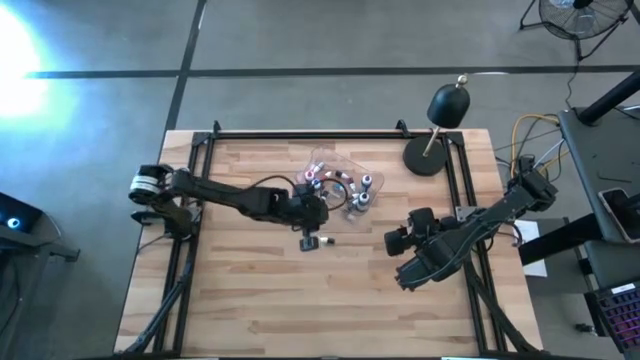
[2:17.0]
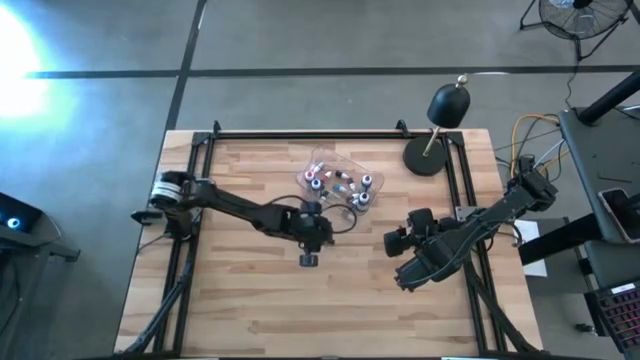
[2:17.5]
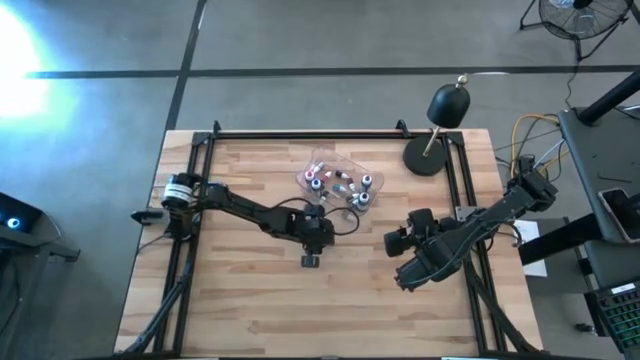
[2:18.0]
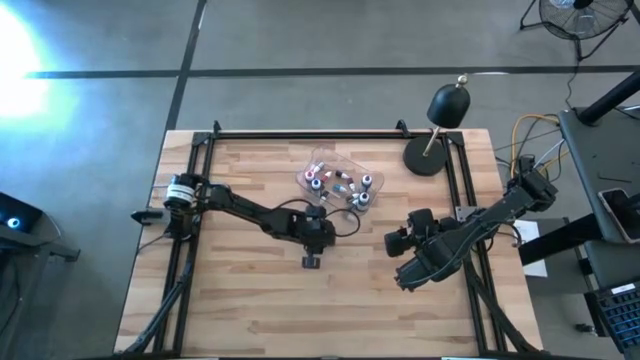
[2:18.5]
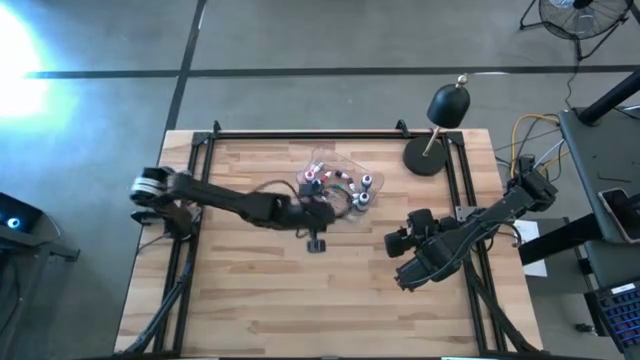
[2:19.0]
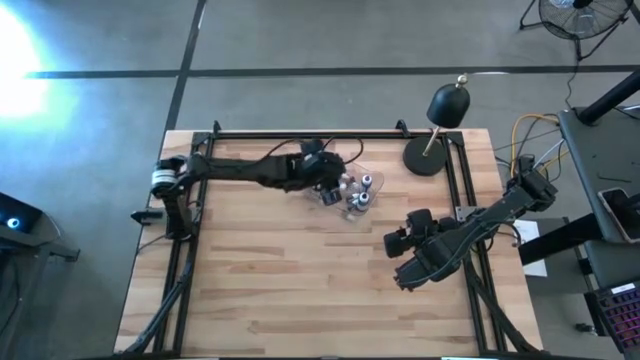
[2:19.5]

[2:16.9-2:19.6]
Task: Pick & Place food coloring
Put the small black food coloring bottle into the transparent bin

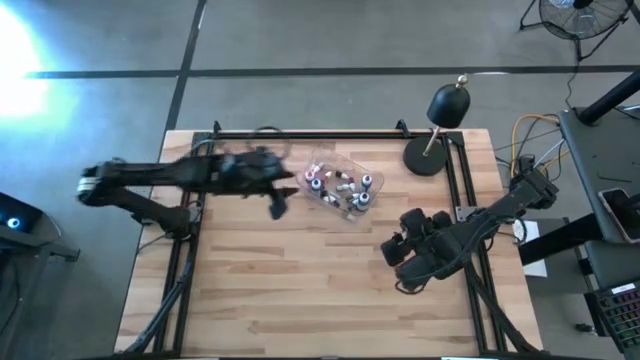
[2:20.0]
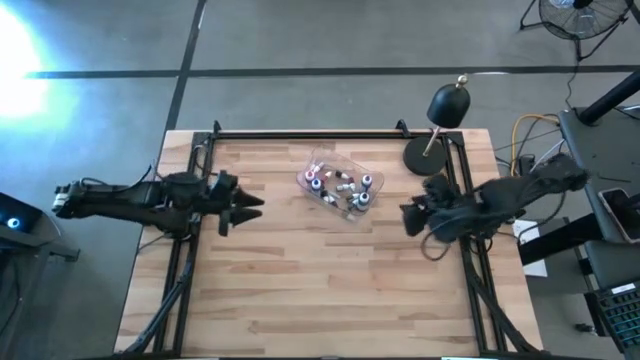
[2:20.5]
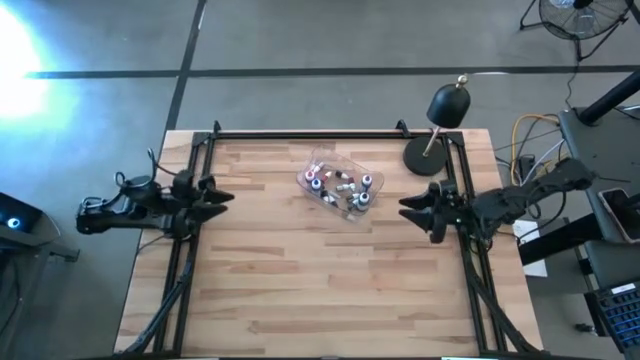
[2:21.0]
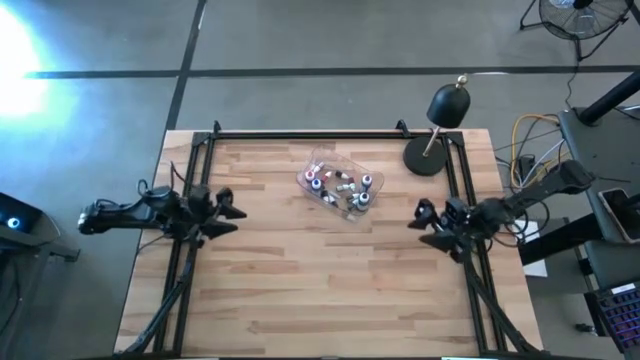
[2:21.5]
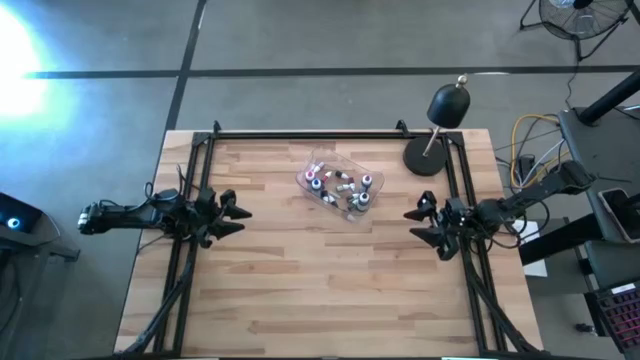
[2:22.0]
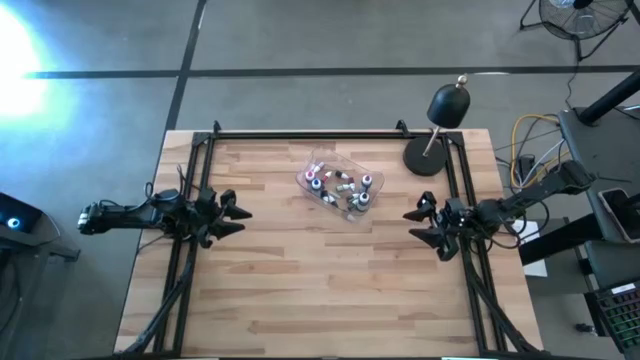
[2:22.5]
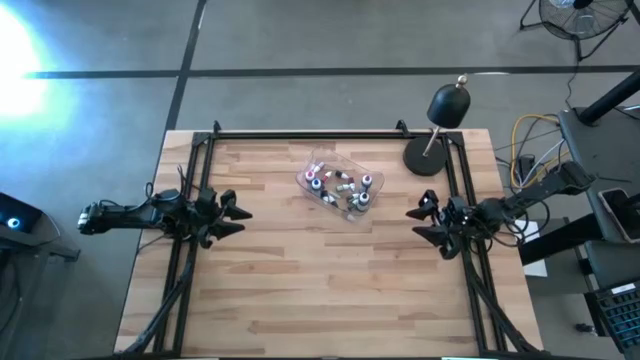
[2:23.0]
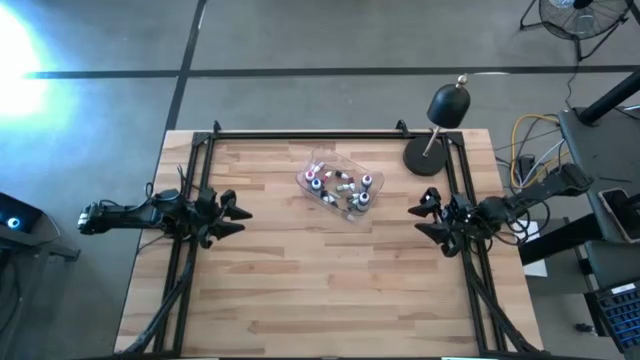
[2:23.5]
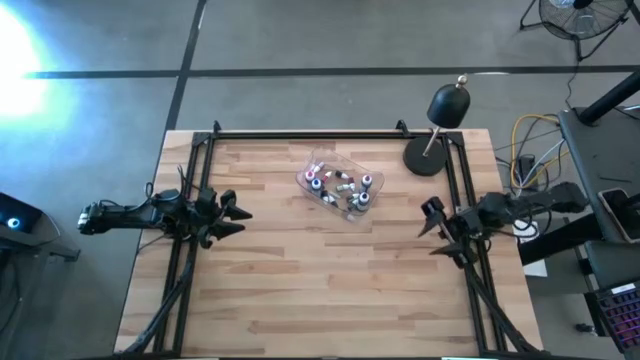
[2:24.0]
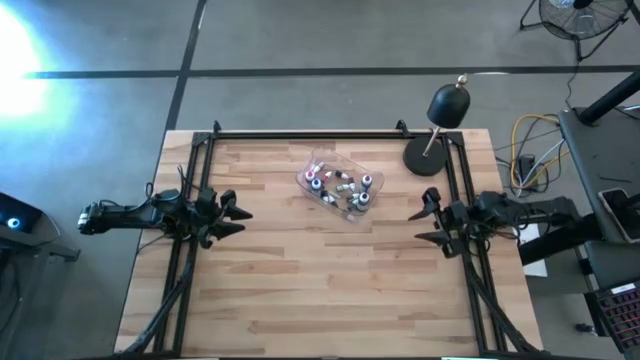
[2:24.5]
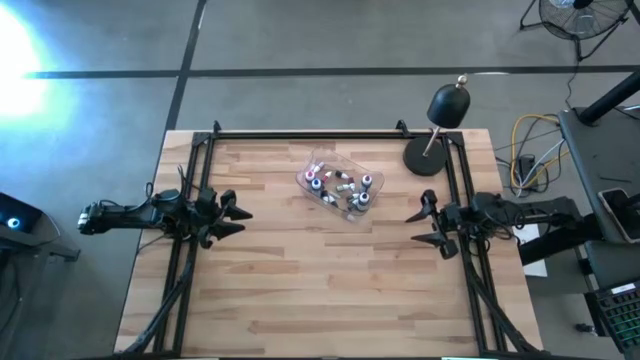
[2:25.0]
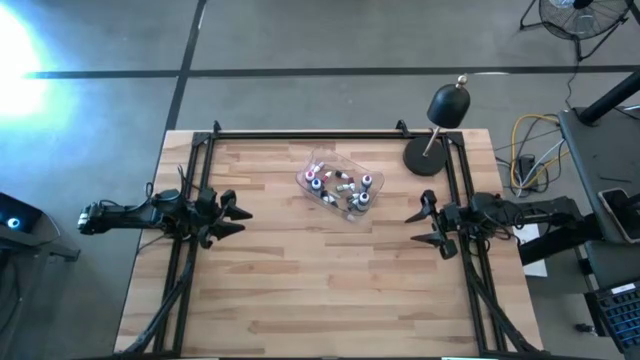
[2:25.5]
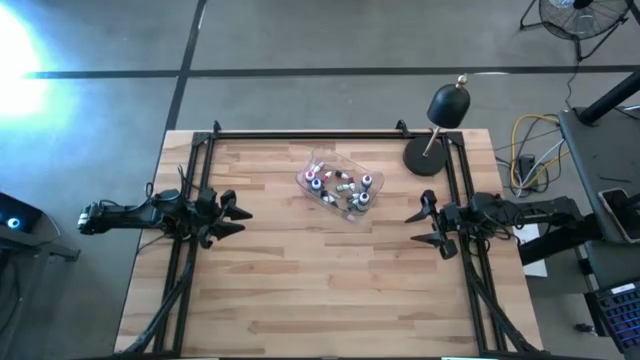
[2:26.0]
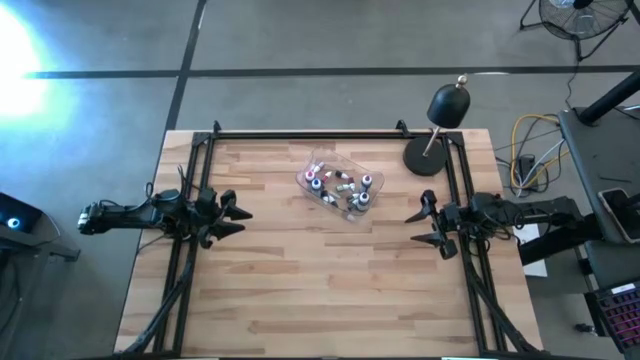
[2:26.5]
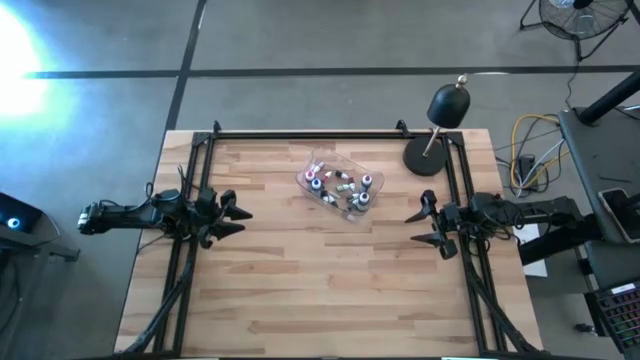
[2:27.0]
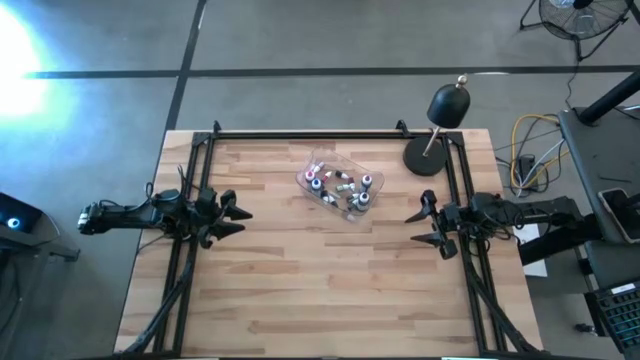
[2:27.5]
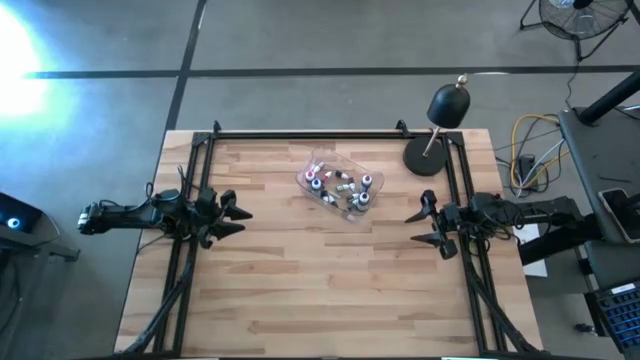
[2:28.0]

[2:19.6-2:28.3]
Return to Home Position

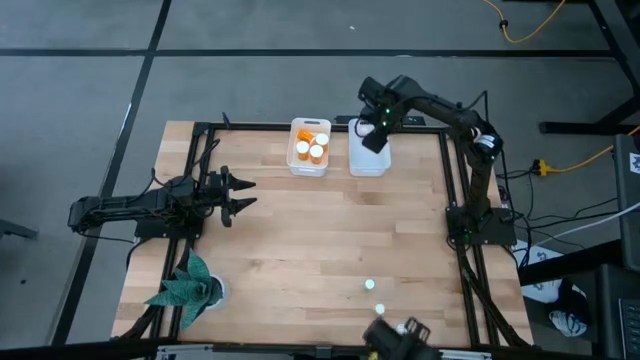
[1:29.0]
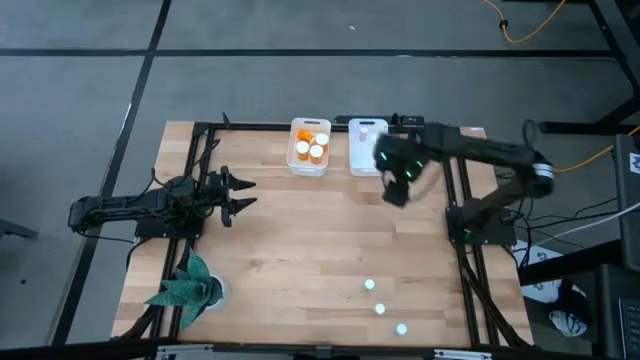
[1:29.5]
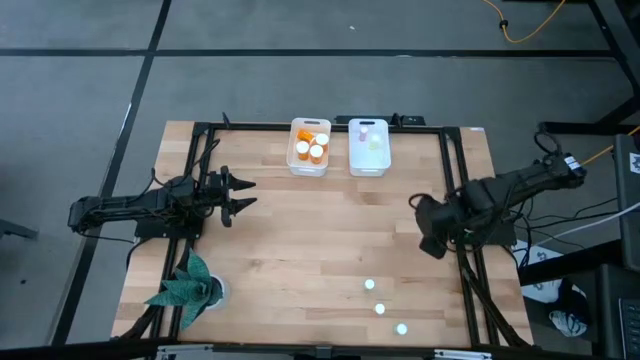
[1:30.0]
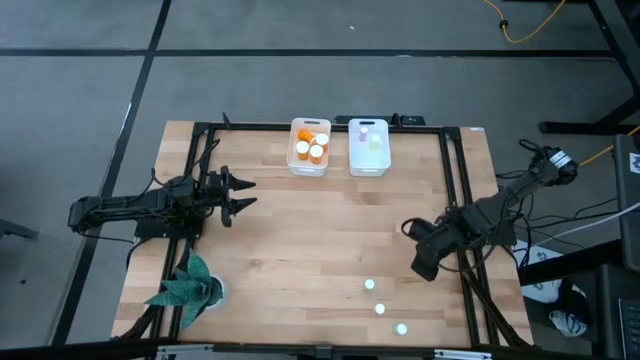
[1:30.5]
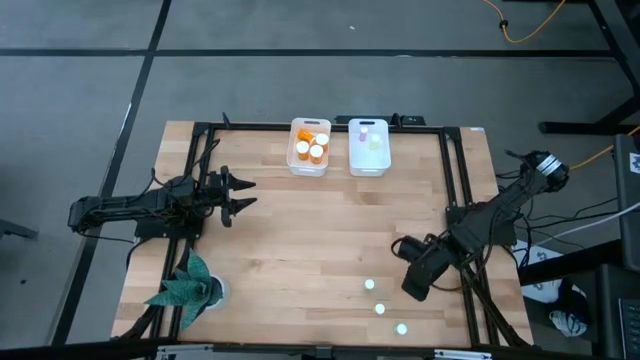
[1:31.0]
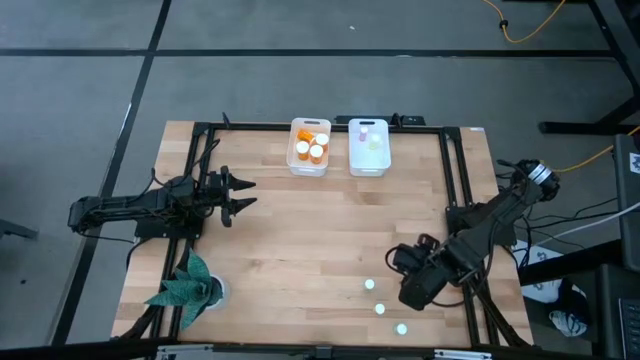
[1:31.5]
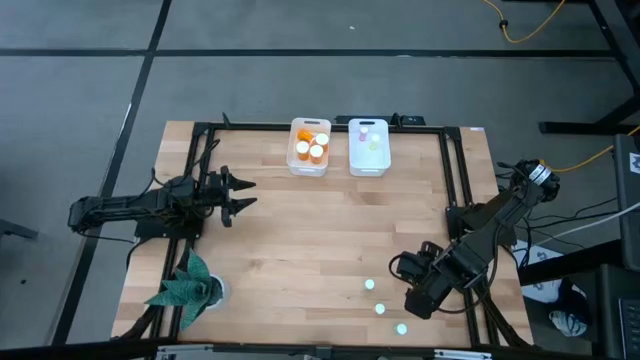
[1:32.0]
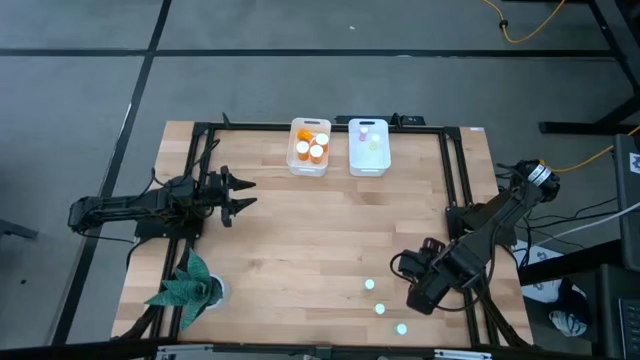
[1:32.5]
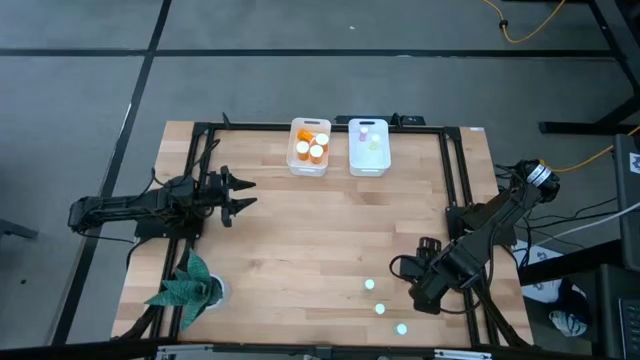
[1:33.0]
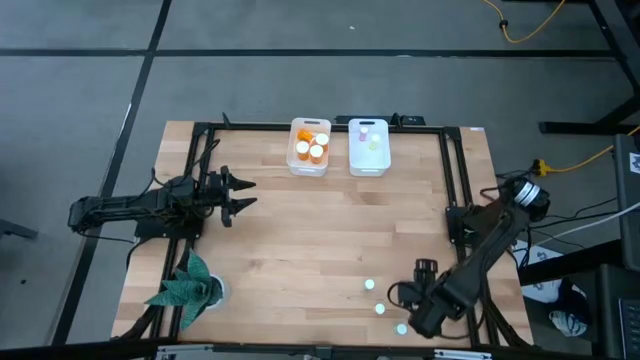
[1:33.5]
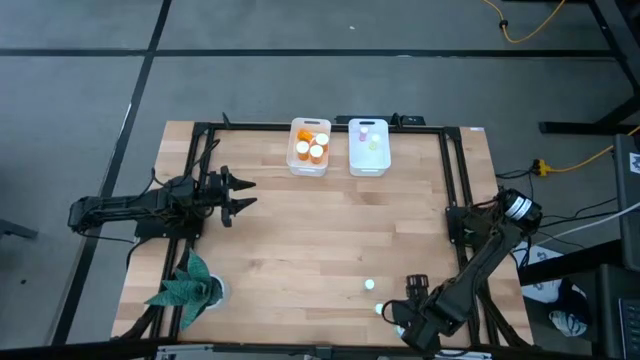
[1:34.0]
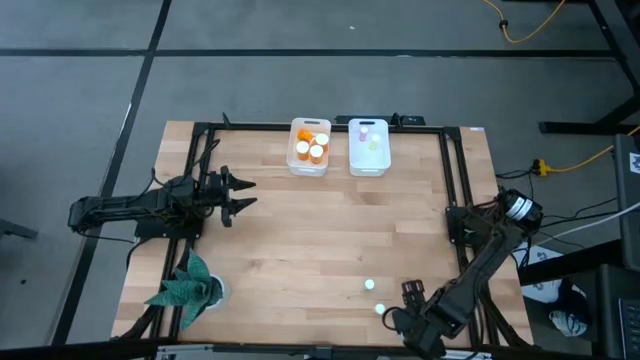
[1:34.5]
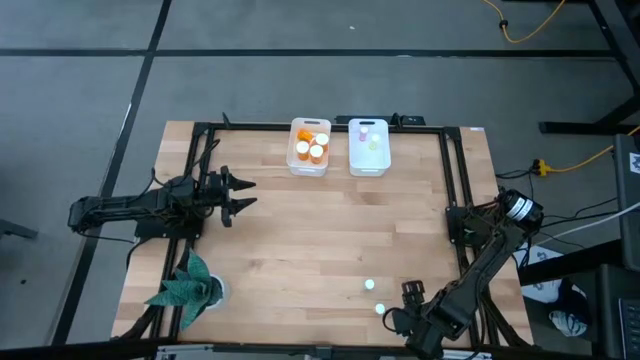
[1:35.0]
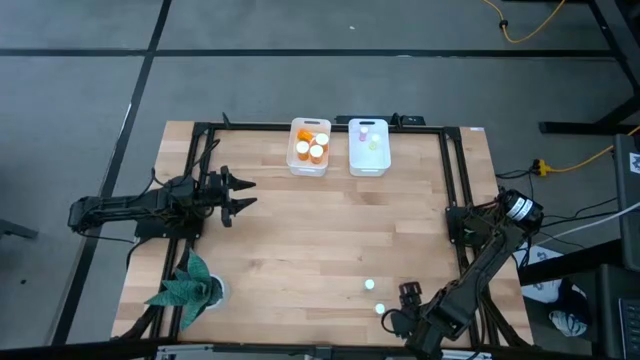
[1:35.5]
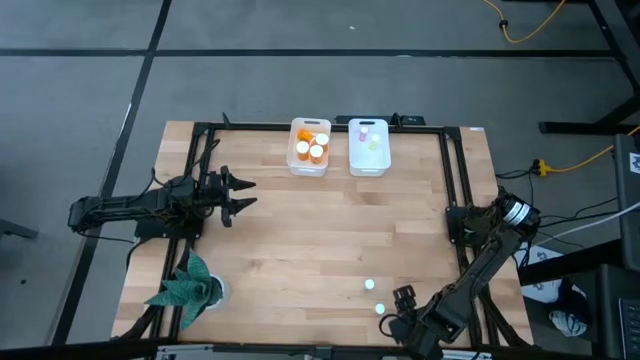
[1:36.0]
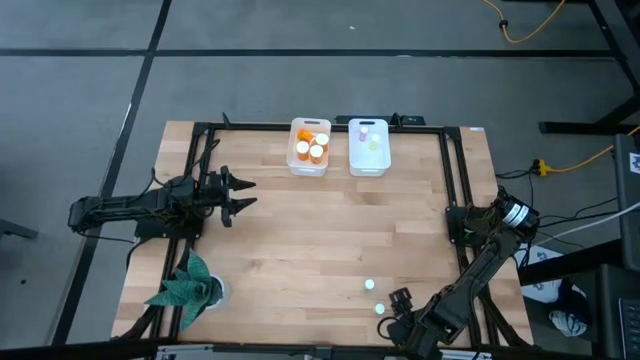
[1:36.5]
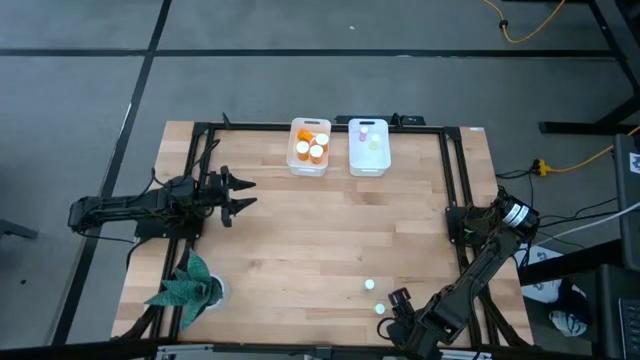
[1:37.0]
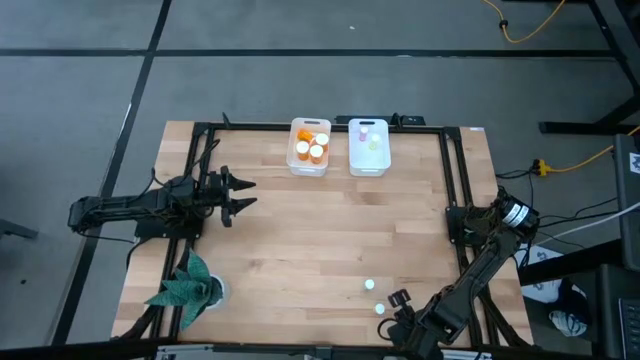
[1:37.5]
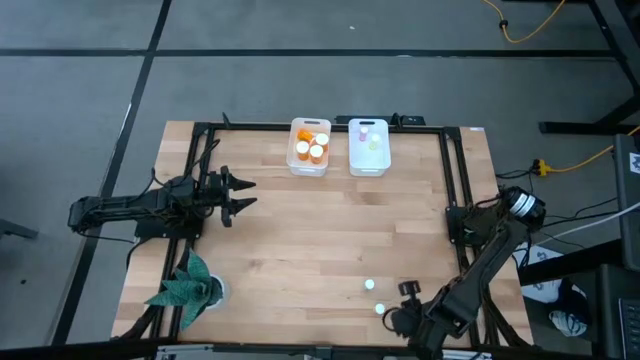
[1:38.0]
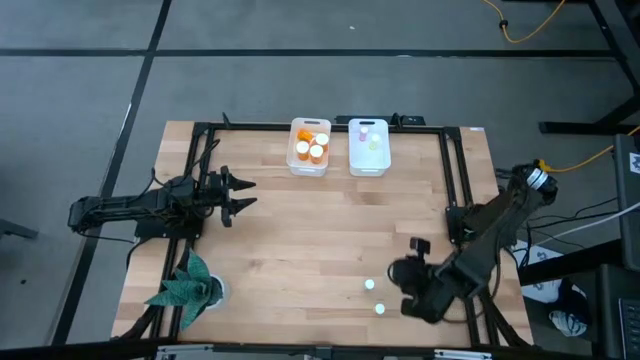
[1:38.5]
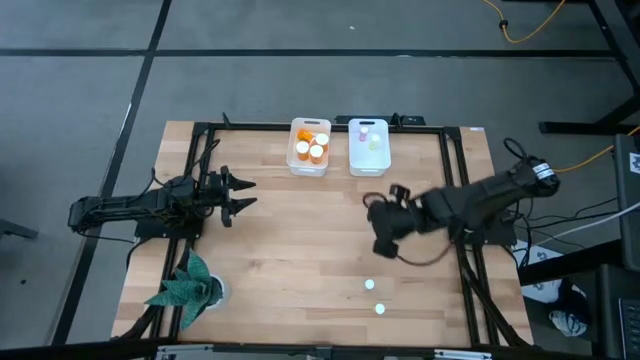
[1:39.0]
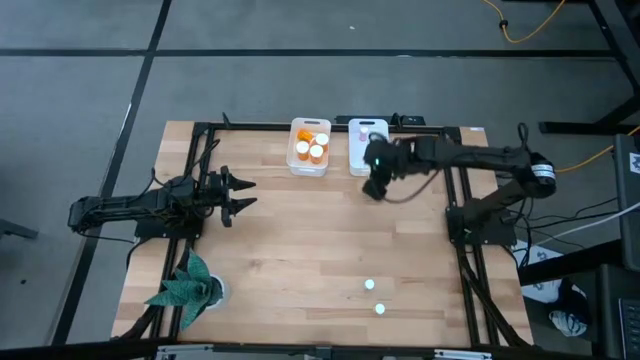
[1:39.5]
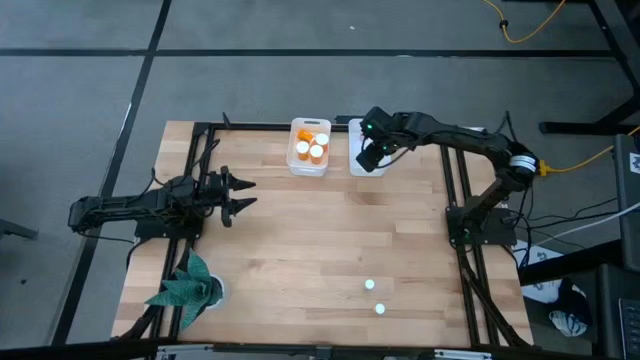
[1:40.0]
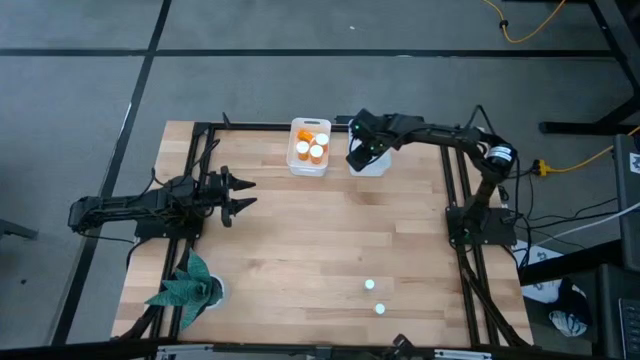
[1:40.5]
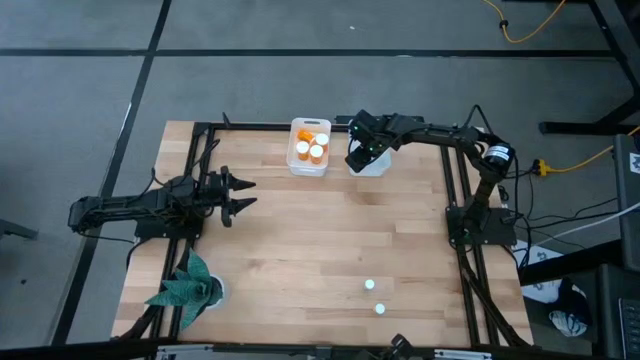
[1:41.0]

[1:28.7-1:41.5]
Task: Pick and place medicine bottles into bin by pill shape (circle, oval)
Put the blue tablet bottle into the right white bin
